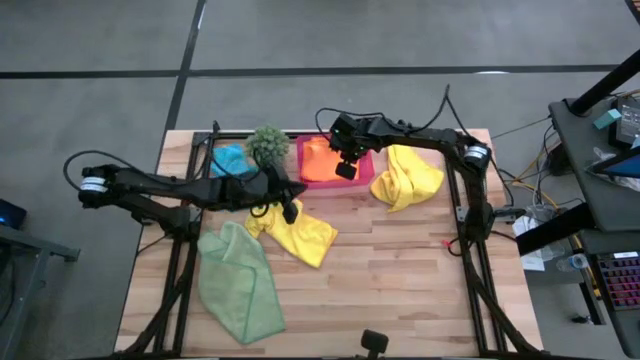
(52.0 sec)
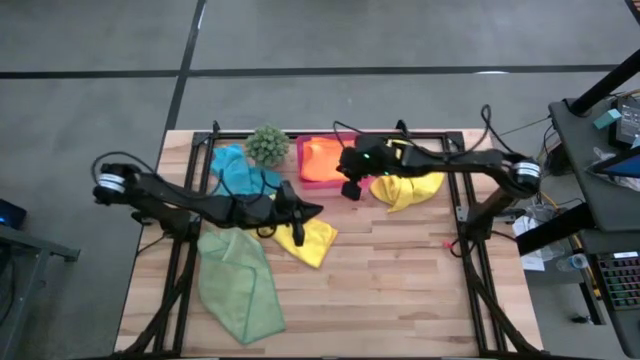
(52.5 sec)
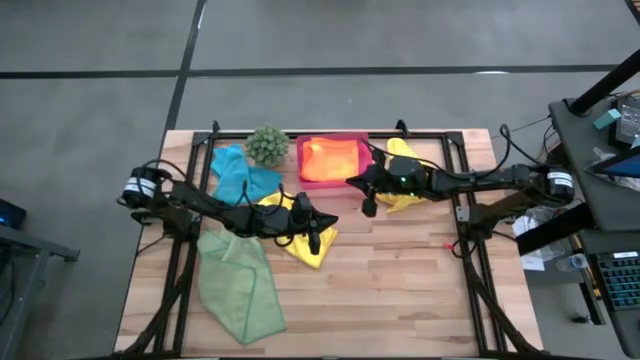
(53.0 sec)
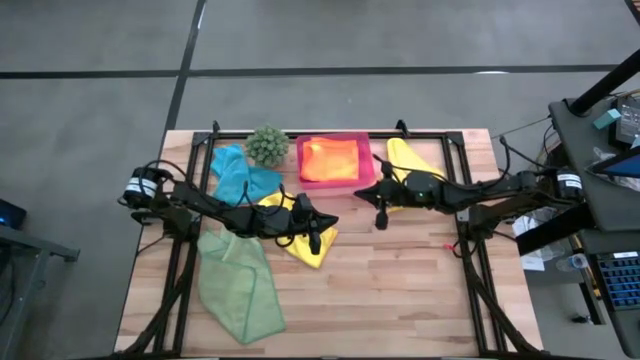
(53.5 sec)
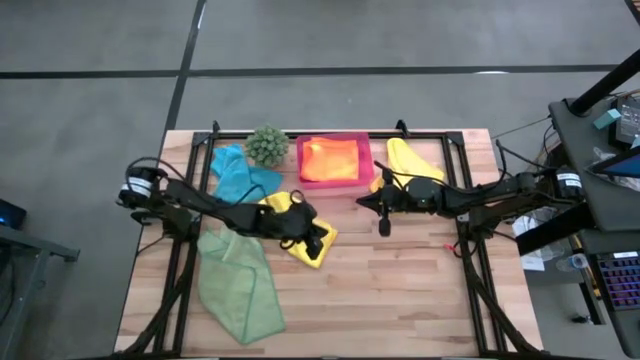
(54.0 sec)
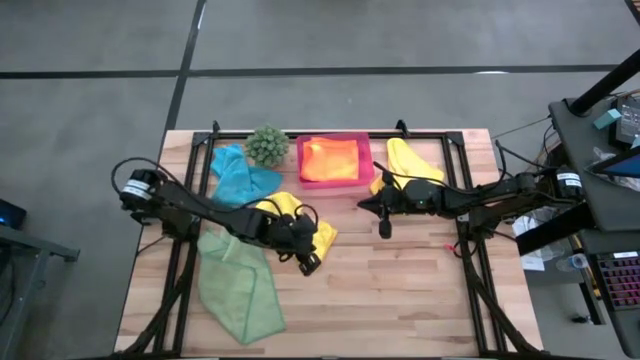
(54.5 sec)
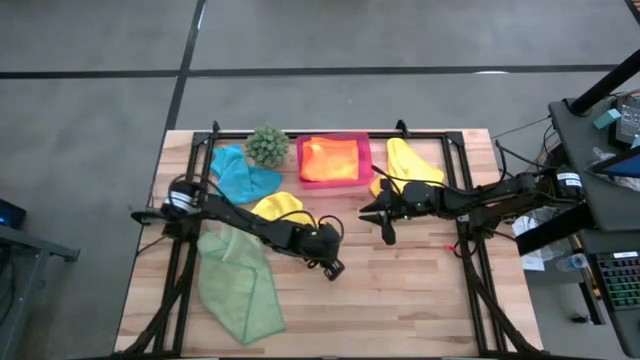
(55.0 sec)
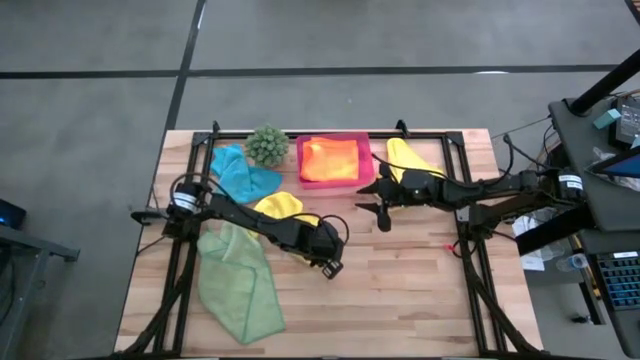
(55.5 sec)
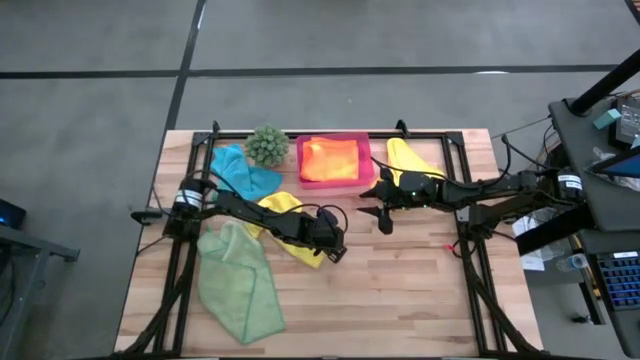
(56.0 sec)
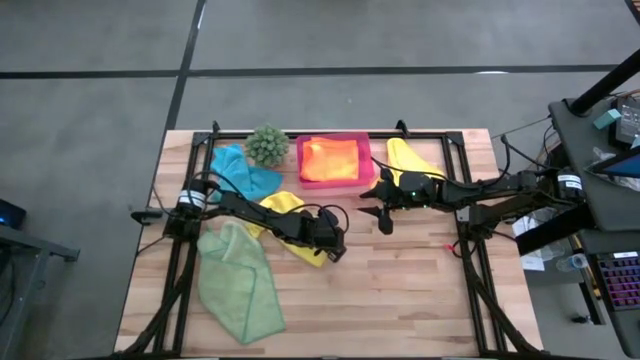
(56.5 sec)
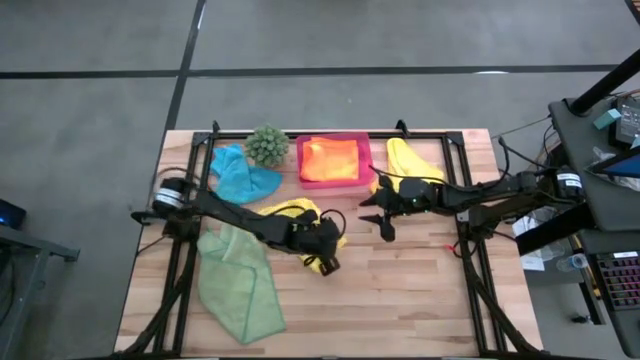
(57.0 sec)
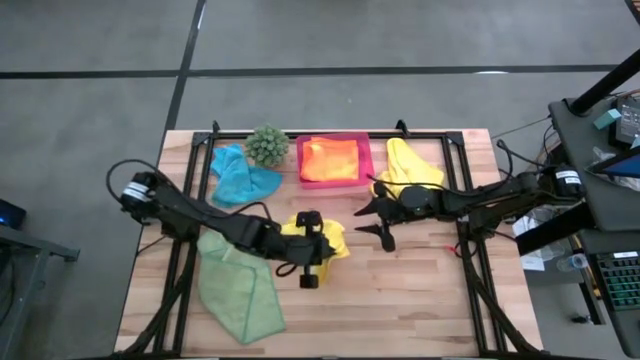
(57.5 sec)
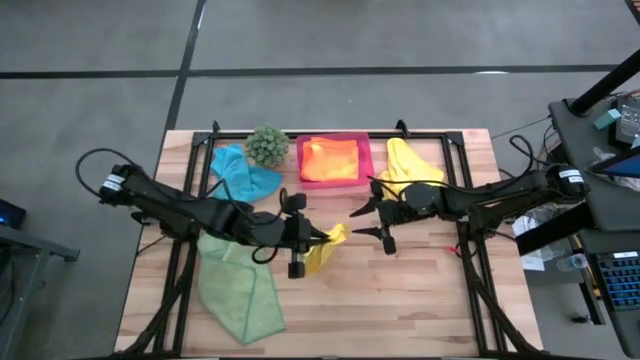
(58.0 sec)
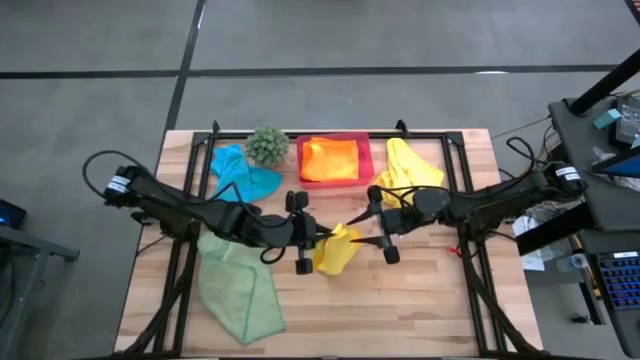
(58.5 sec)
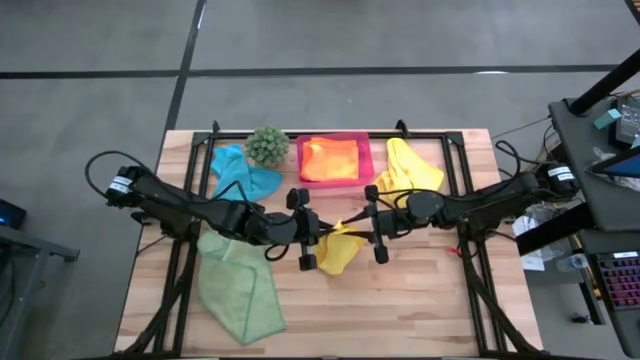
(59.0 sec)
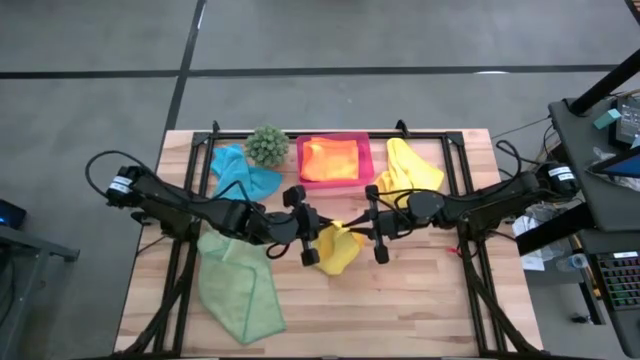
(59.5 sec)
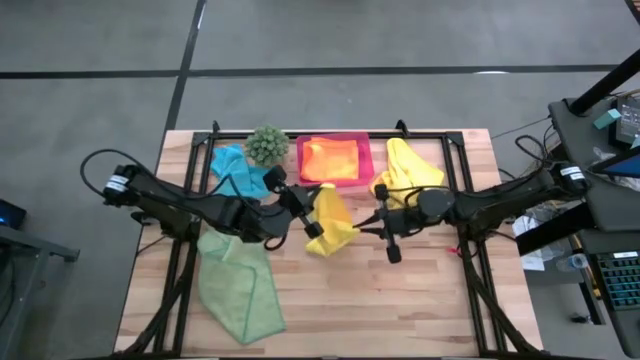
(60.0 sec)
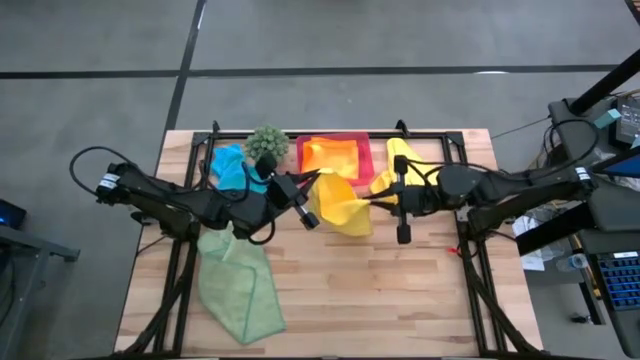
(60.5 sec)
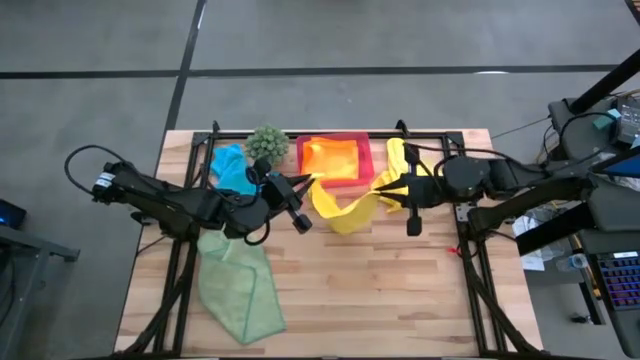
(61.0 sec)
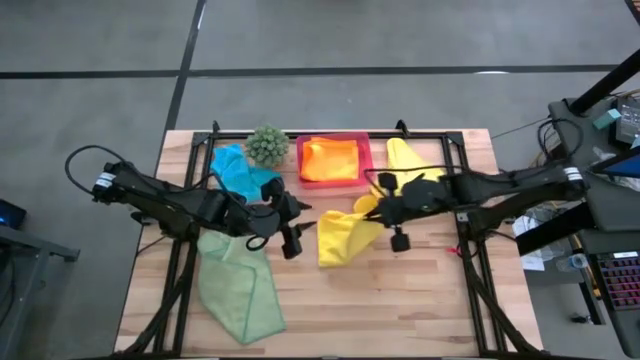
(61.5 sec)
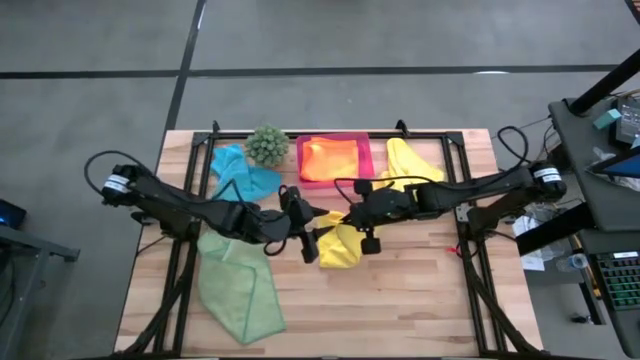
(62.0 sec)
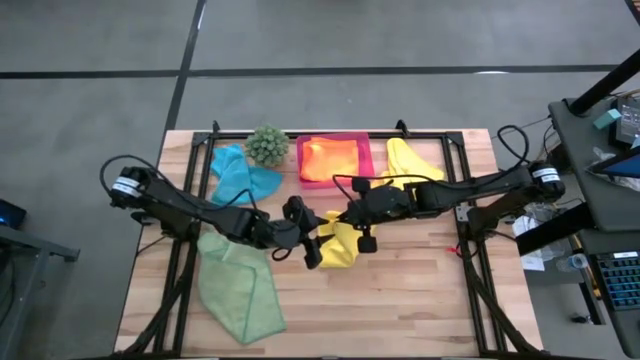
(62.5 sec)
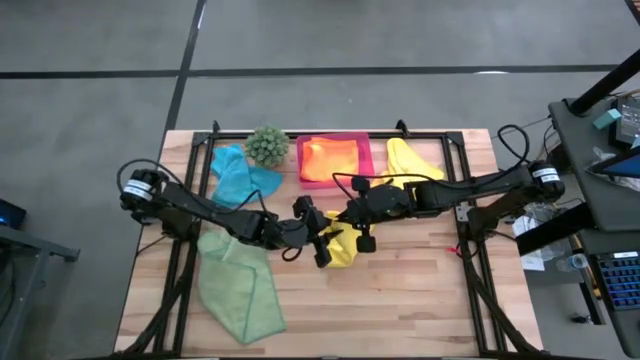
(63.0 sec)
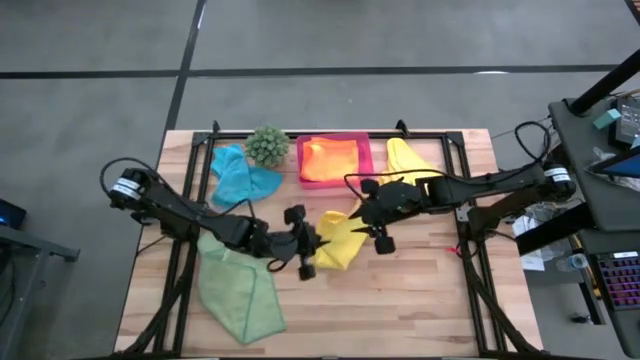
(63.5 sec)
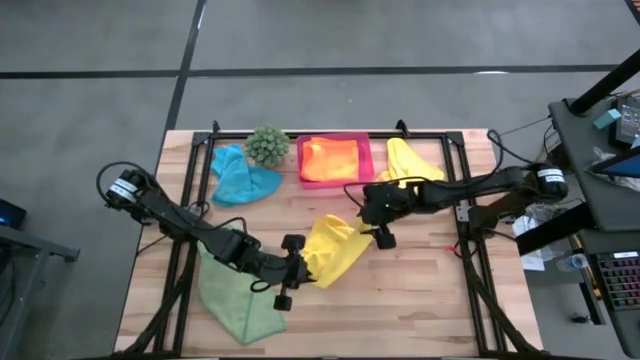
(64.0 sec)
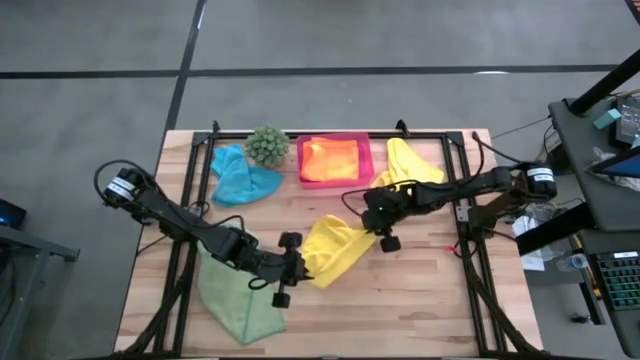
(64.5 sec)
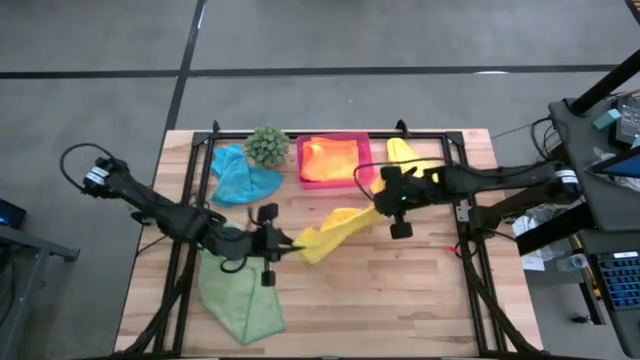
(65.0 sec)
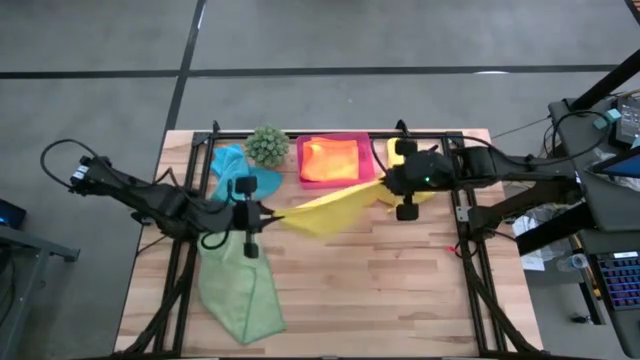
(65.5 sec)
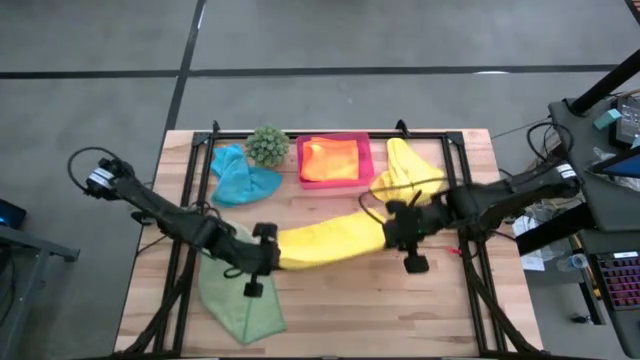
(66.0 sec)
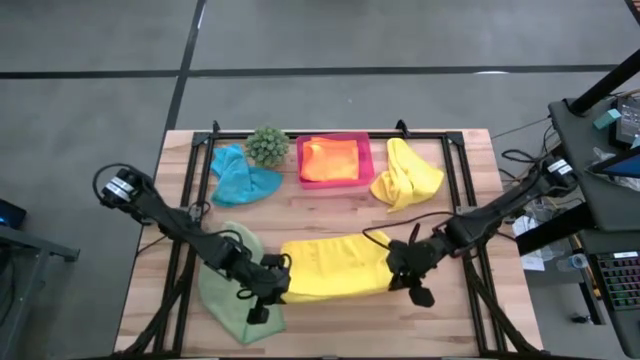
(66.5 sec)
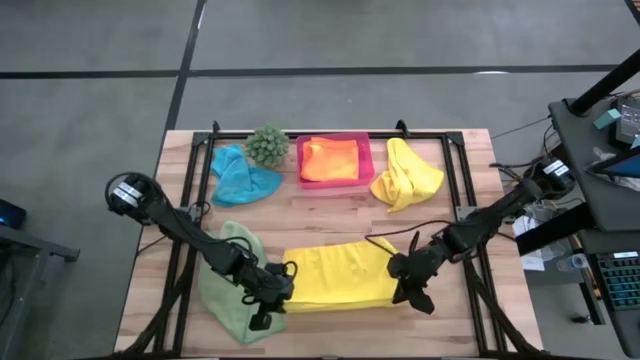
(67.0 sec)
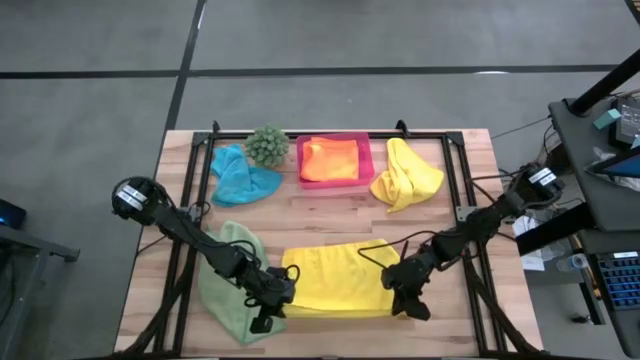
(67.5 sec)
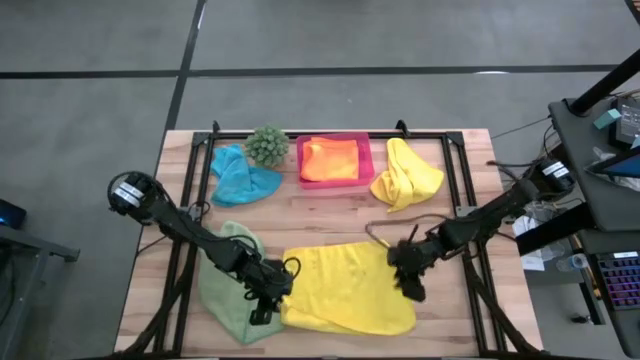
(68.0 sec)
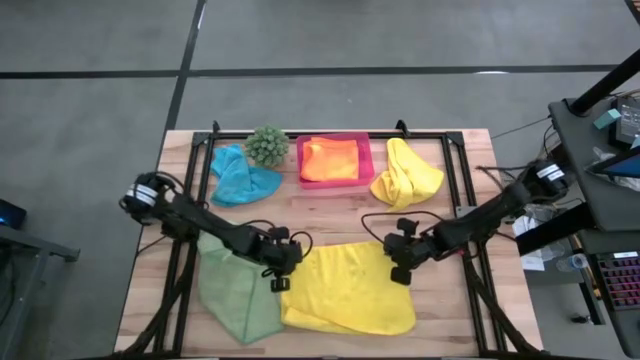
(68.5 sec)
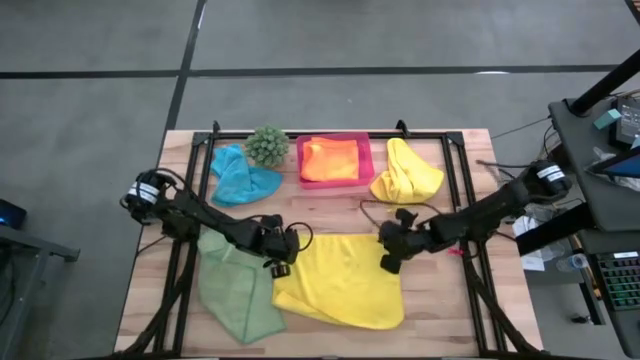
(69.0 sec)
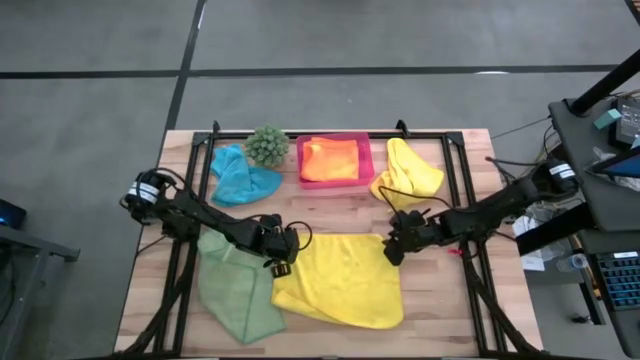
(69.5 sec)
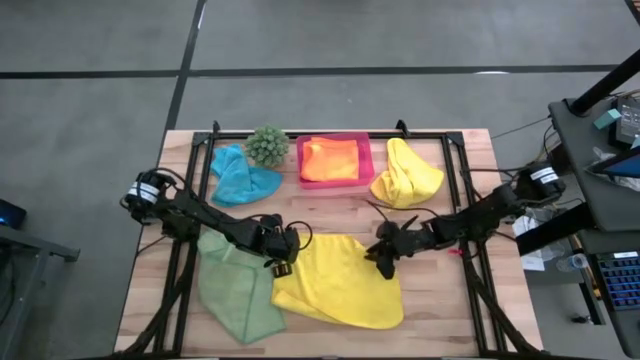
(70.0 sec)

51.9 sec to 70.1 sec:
Task: Fold microfiber towels
Fold the bottom yellow microfiber towel

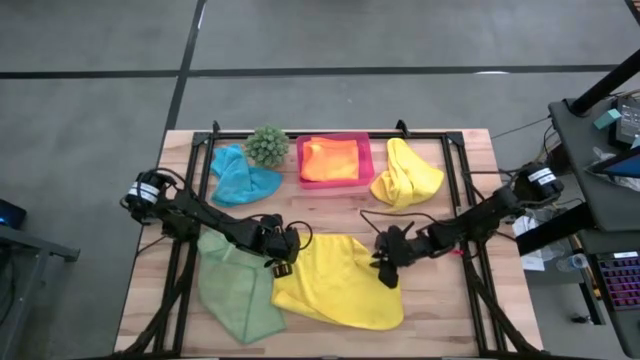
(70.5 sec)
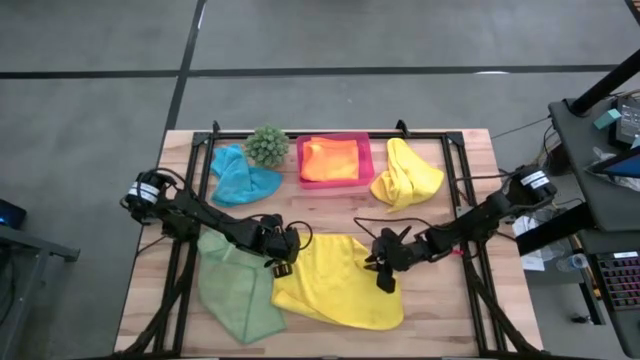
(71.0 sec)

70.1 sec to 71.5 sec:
Fold the bottom yellow microfiber towel
